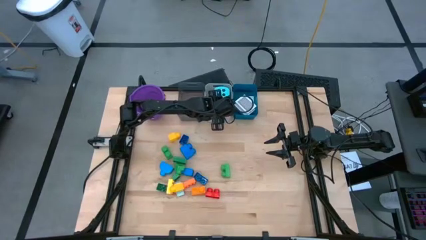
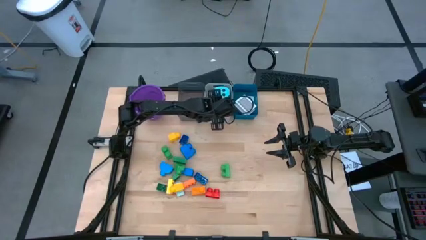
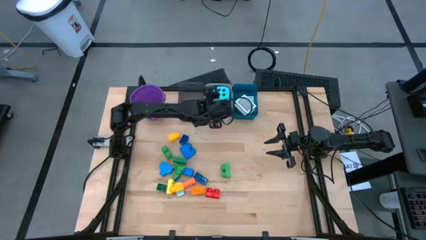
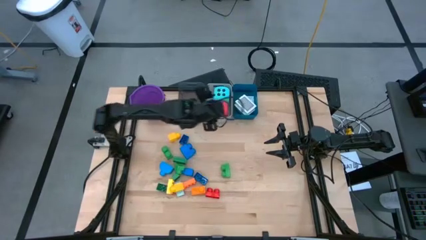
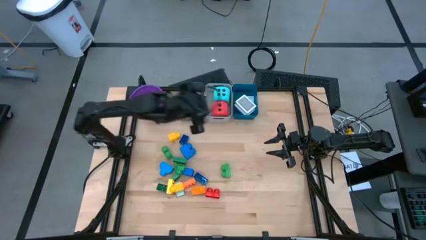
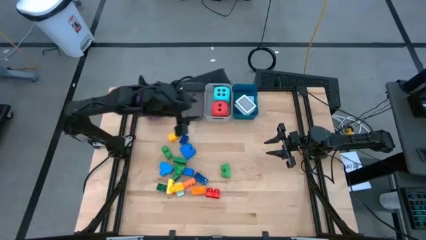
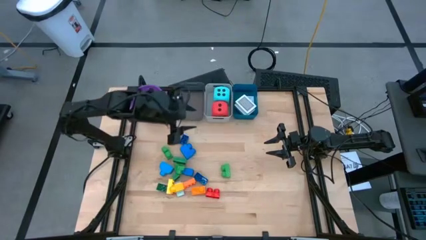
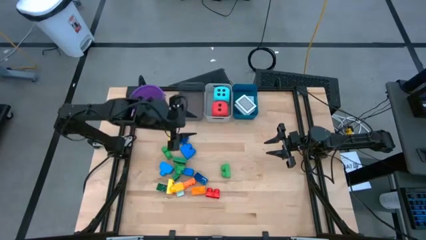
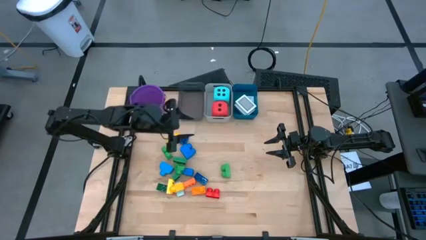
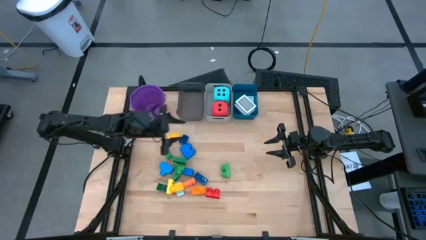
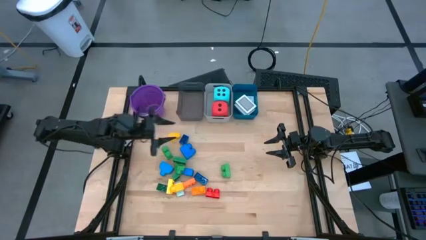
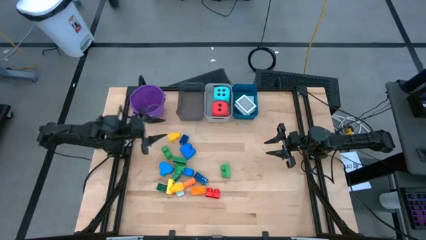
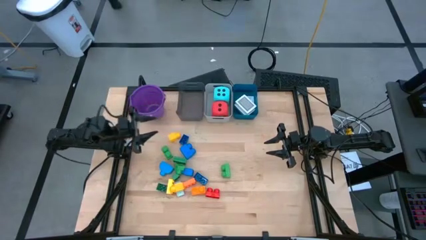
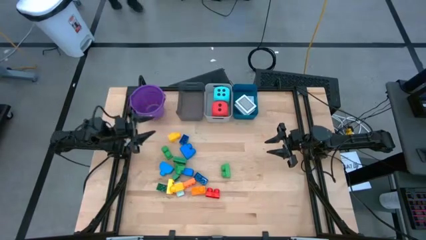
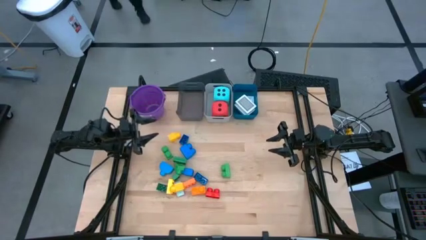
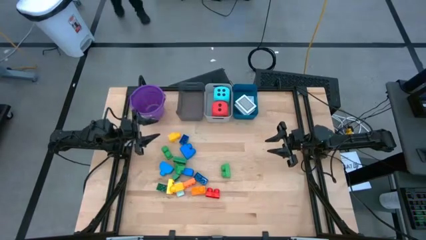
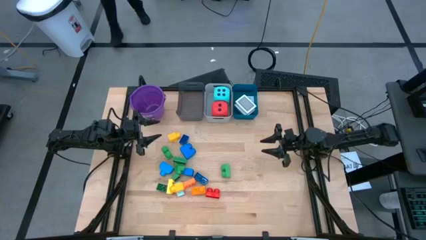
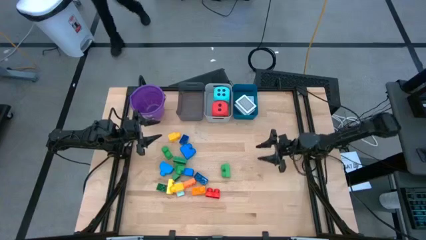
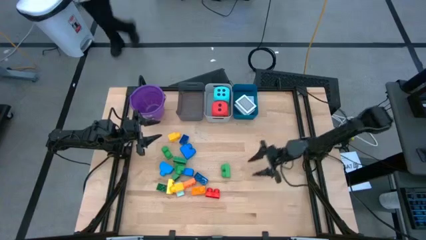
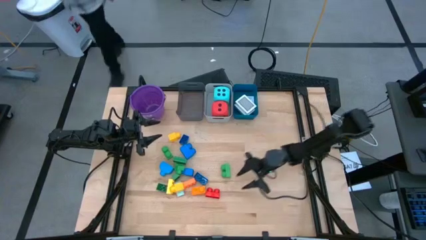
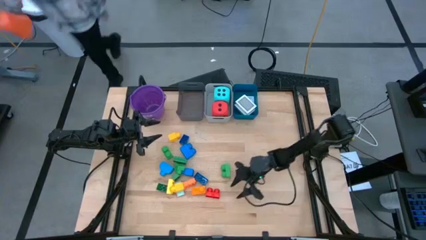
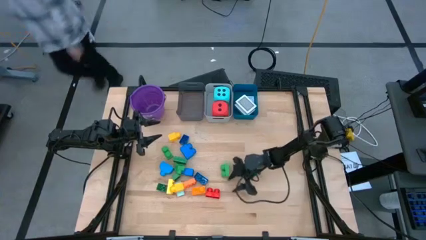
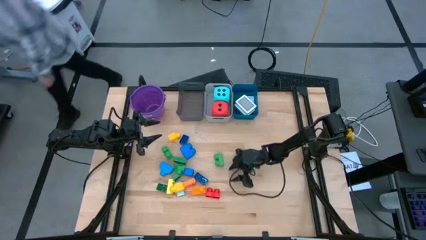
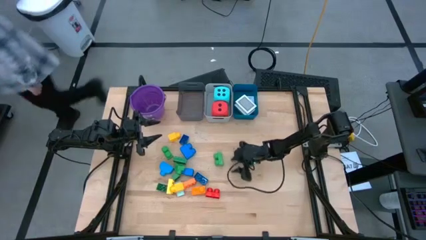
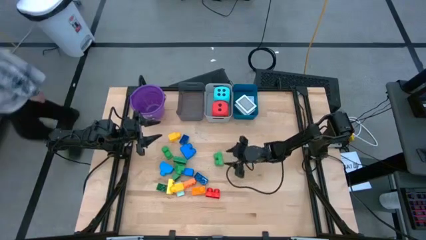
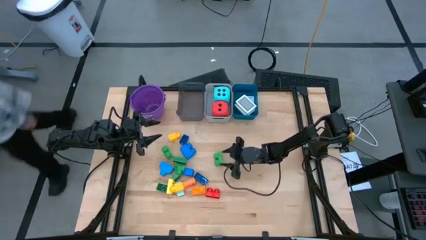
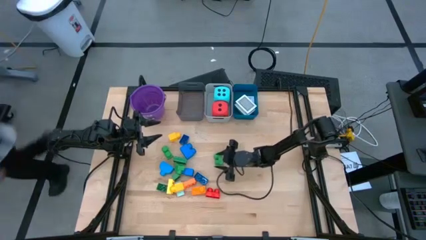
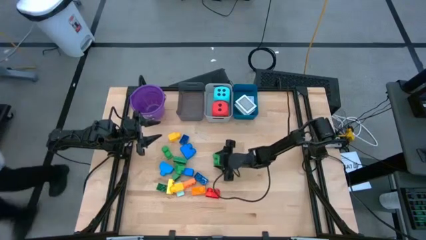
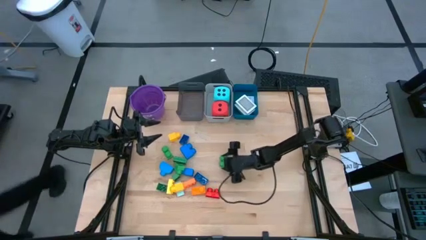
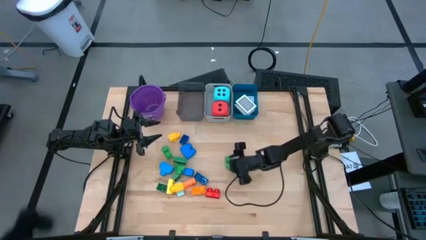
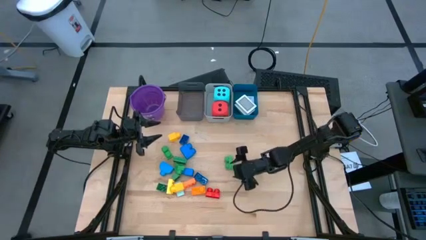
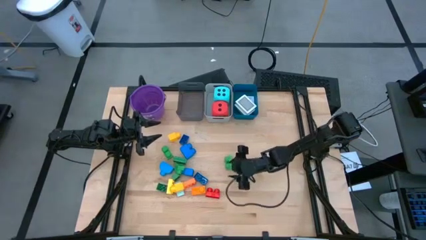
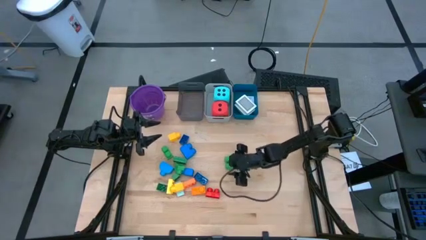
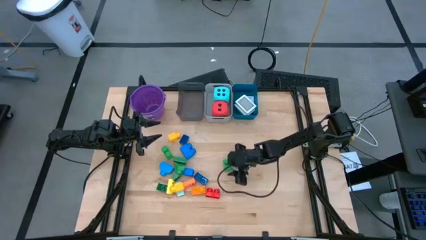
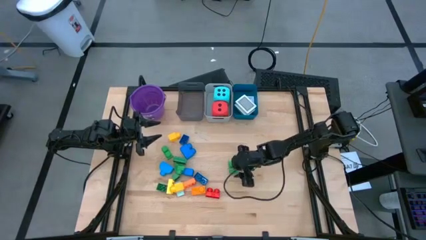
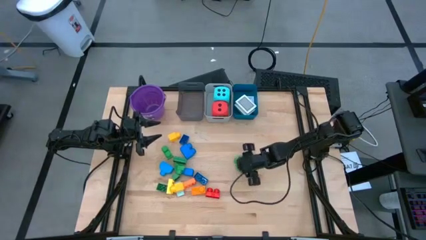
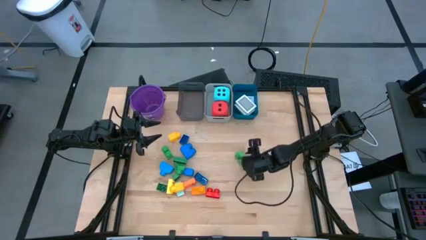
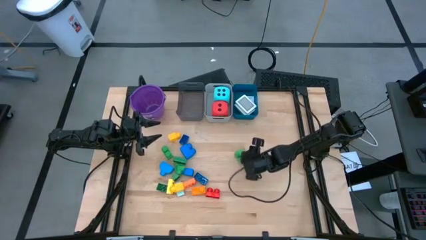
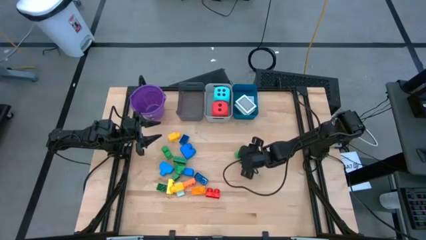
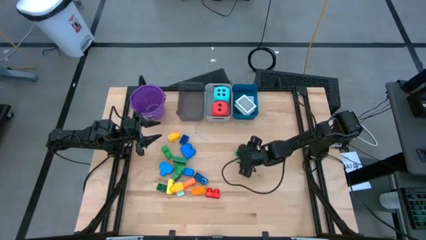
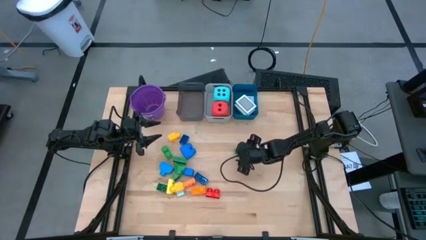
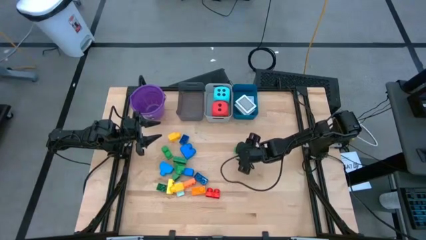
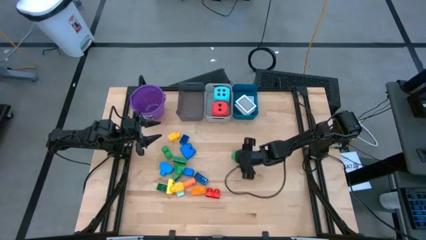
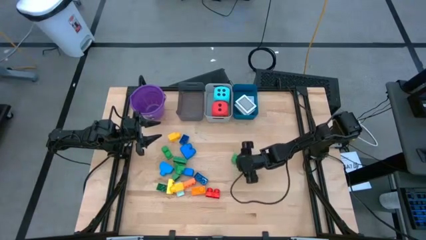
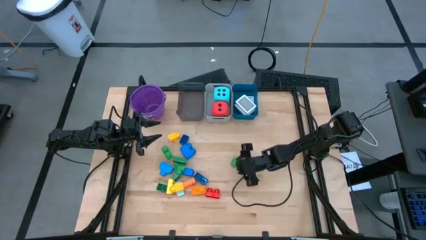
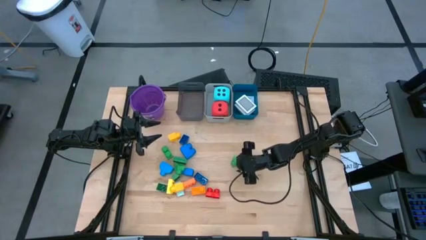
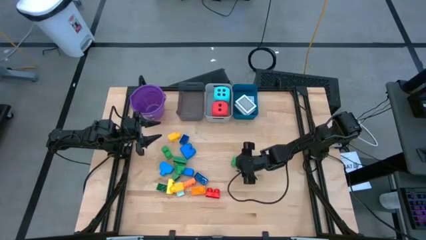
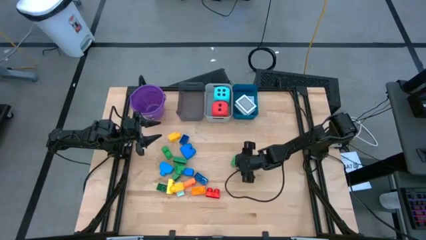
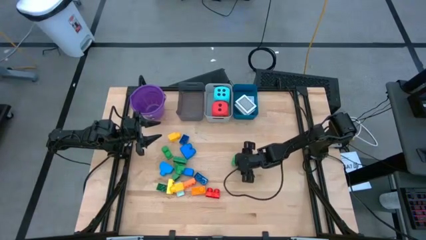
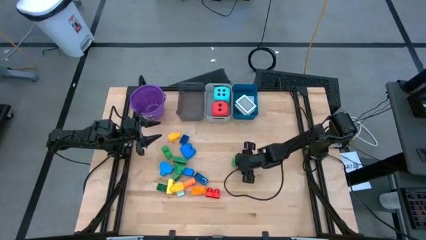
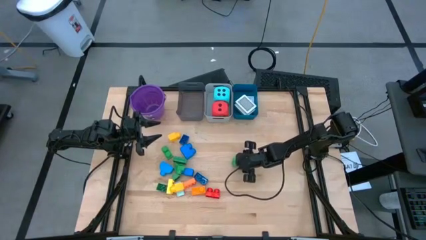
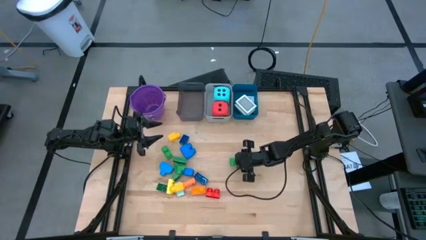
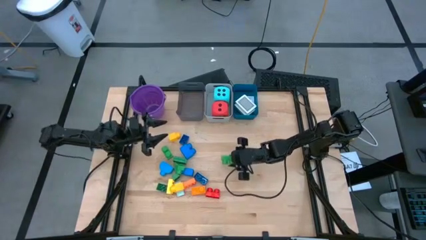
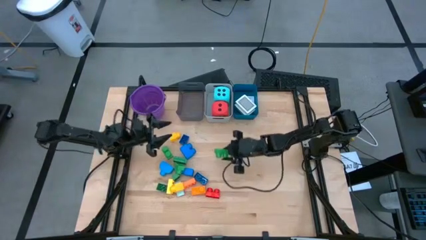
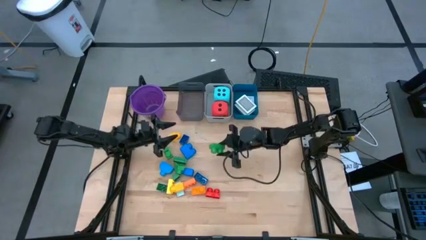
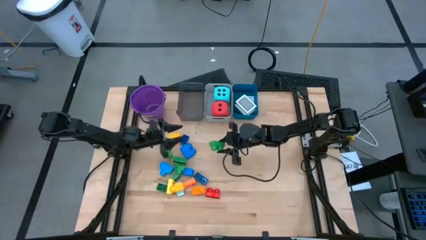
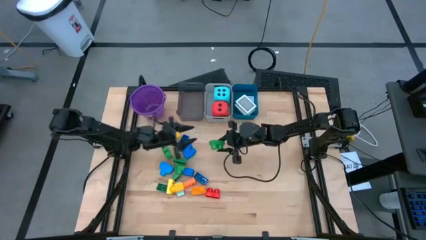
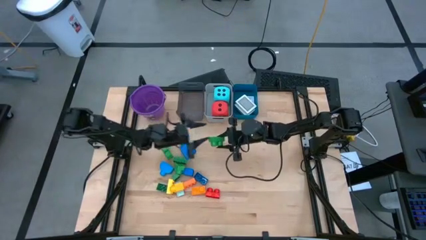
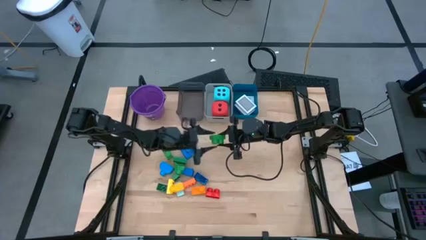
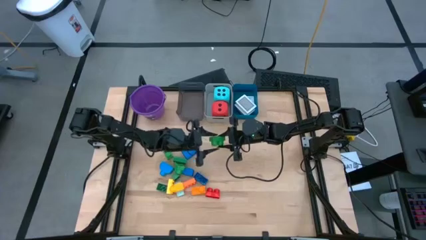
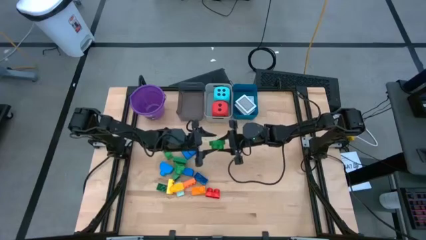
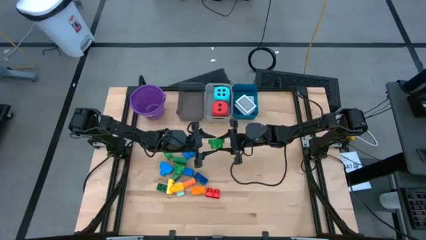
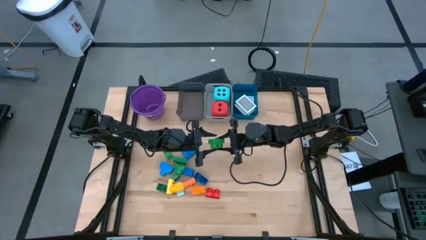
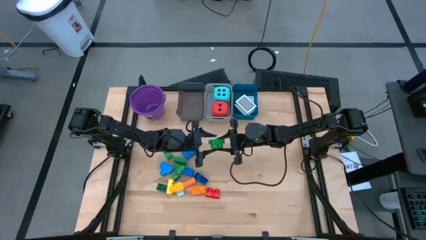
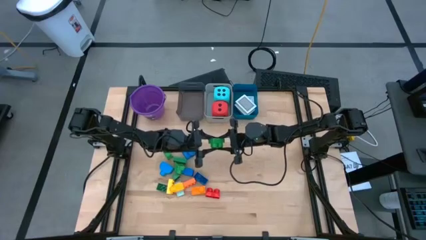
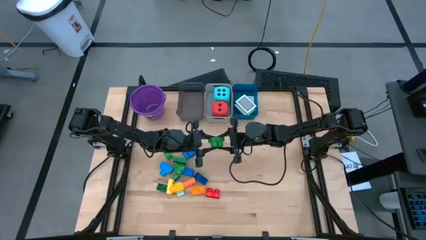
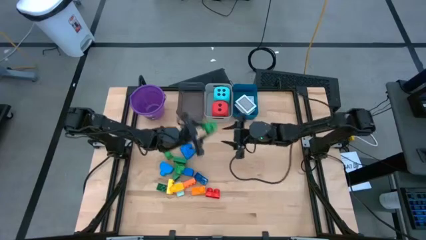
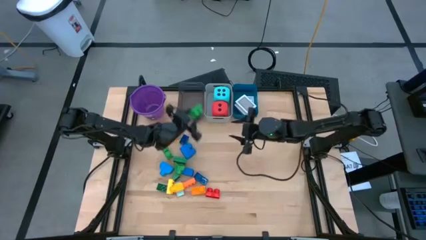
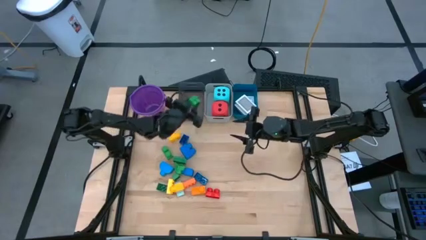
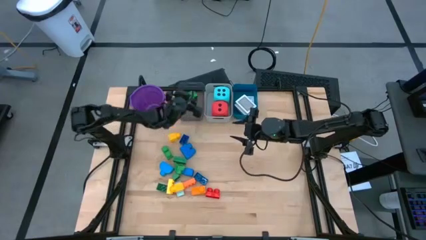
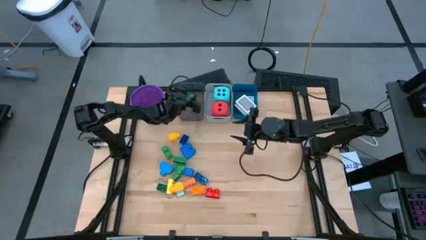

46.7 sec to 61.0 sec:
Task: Pick & Place Toys
Put the green game piece into the black bin
